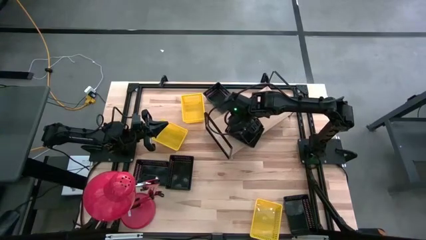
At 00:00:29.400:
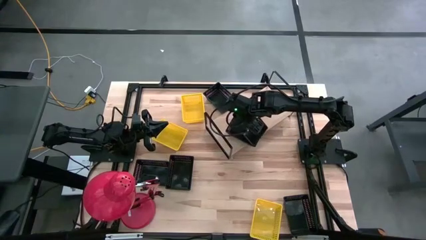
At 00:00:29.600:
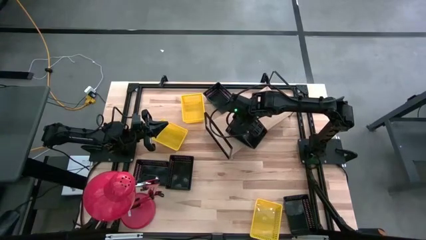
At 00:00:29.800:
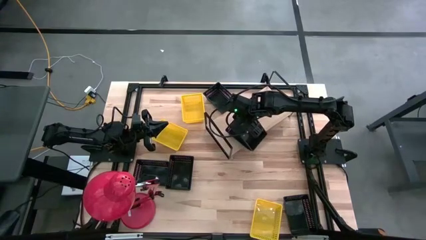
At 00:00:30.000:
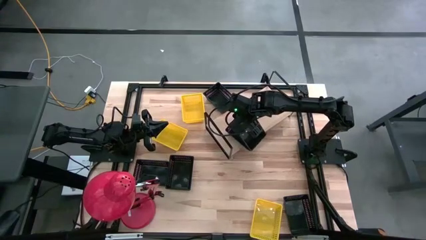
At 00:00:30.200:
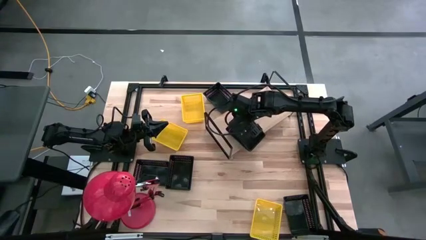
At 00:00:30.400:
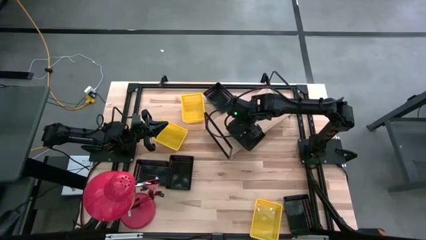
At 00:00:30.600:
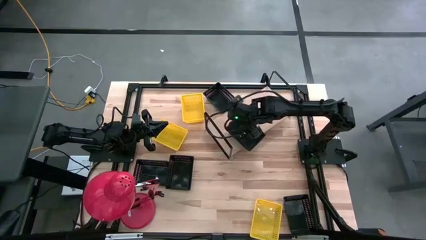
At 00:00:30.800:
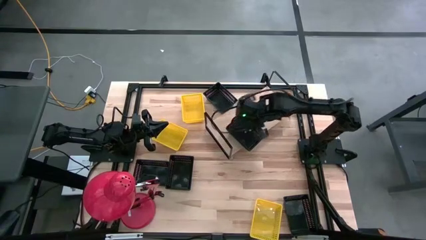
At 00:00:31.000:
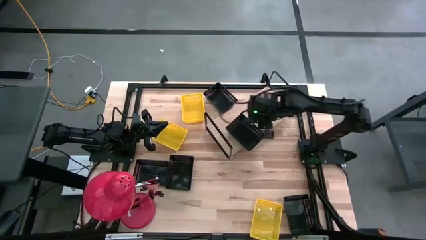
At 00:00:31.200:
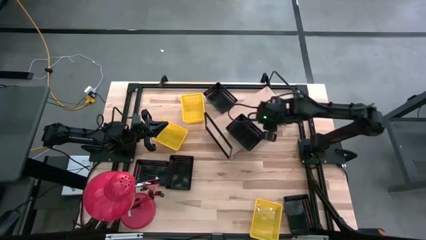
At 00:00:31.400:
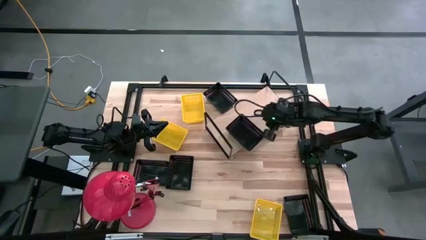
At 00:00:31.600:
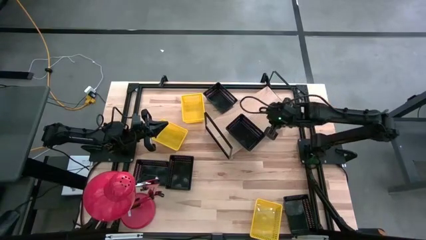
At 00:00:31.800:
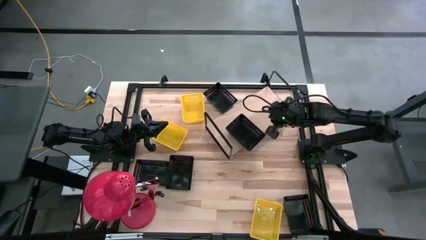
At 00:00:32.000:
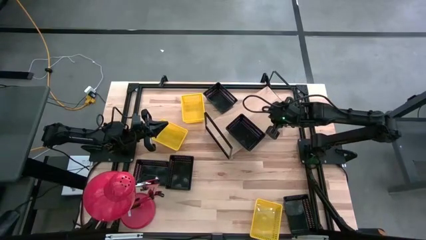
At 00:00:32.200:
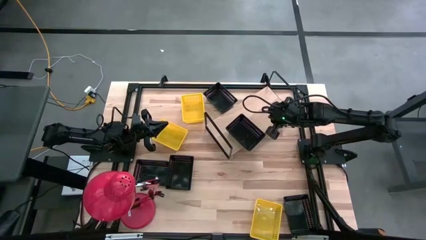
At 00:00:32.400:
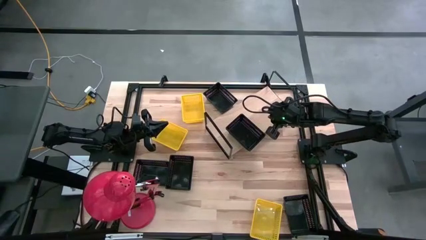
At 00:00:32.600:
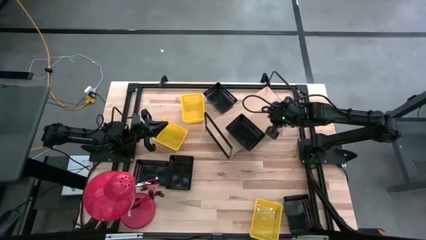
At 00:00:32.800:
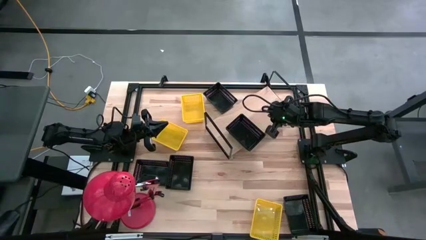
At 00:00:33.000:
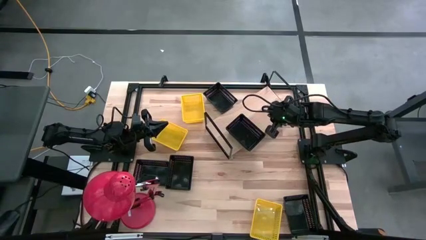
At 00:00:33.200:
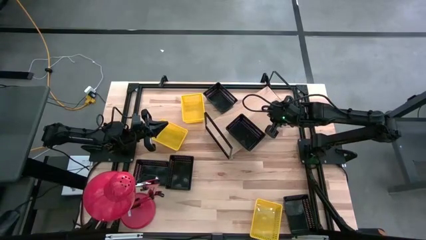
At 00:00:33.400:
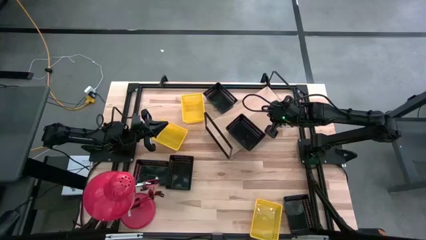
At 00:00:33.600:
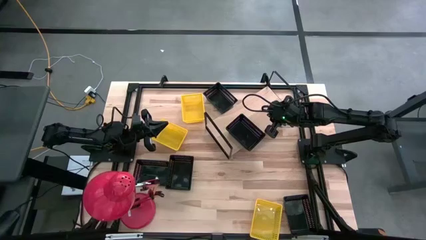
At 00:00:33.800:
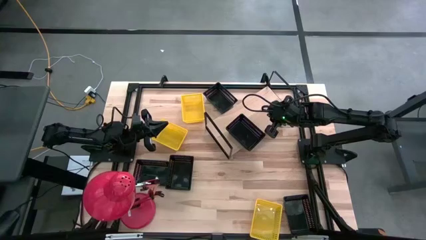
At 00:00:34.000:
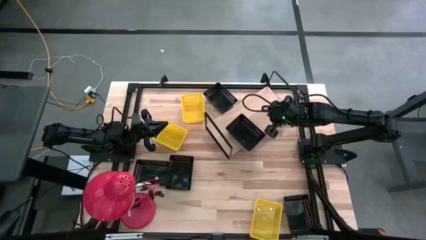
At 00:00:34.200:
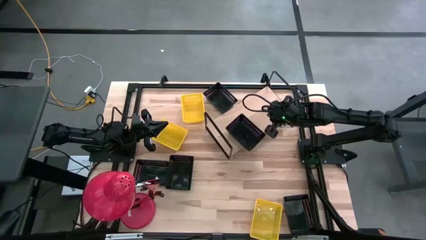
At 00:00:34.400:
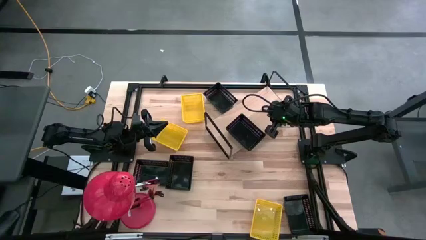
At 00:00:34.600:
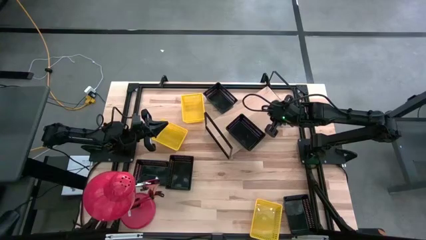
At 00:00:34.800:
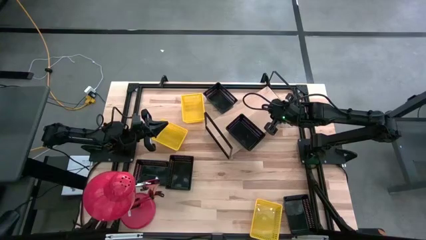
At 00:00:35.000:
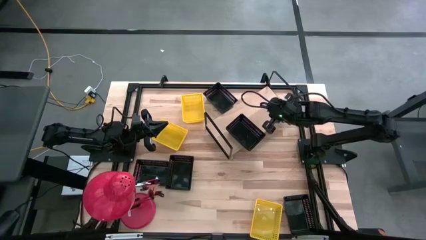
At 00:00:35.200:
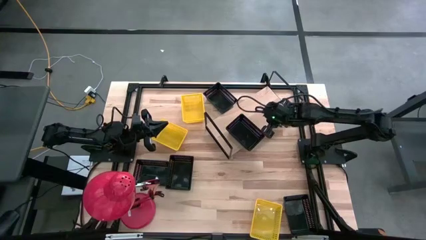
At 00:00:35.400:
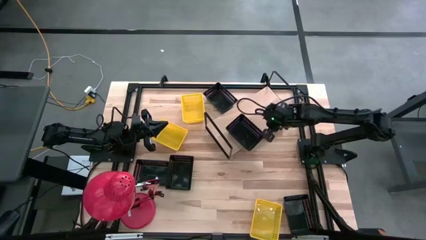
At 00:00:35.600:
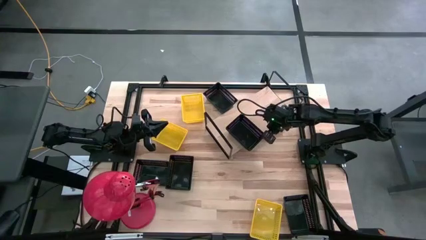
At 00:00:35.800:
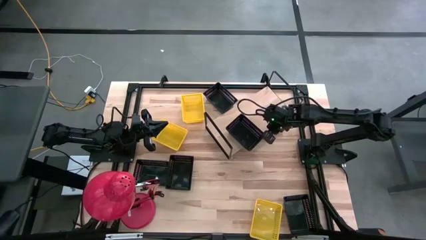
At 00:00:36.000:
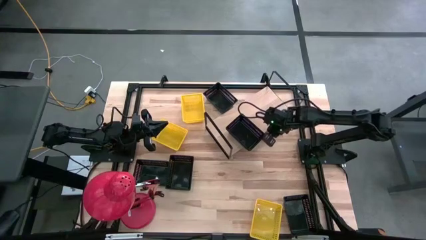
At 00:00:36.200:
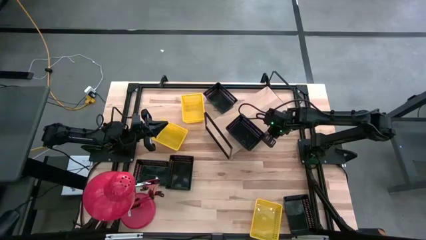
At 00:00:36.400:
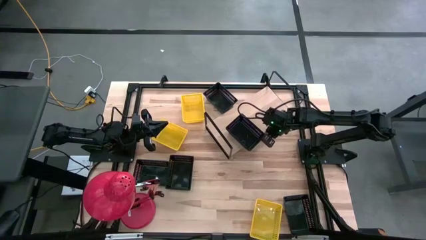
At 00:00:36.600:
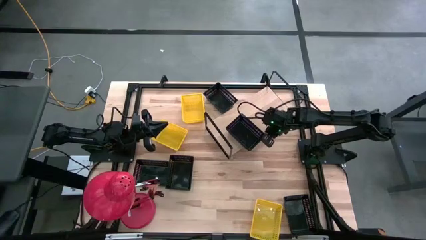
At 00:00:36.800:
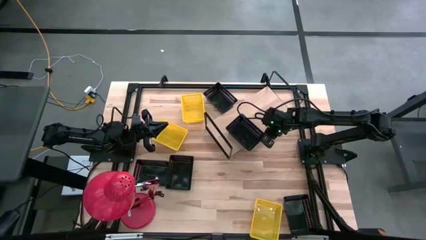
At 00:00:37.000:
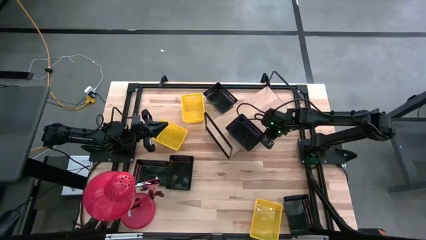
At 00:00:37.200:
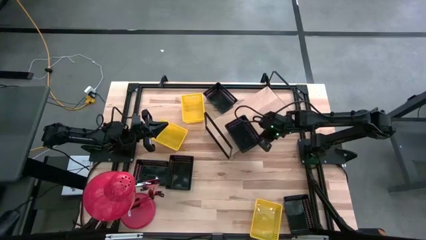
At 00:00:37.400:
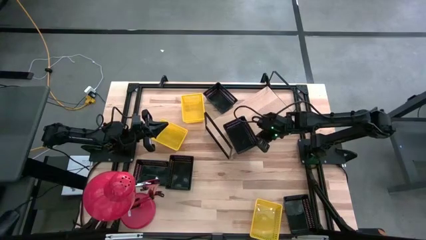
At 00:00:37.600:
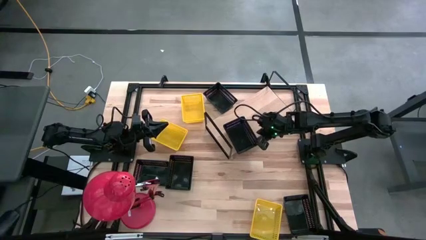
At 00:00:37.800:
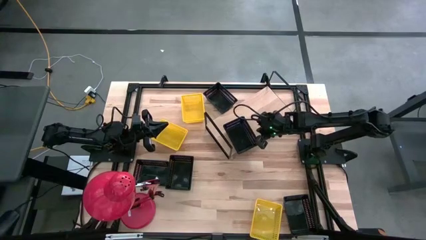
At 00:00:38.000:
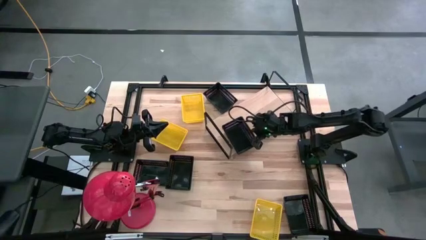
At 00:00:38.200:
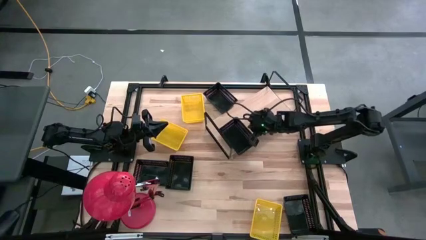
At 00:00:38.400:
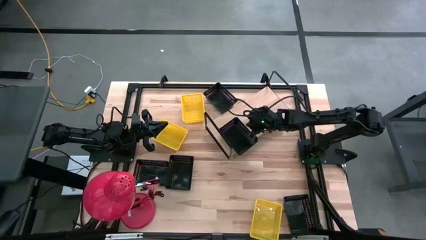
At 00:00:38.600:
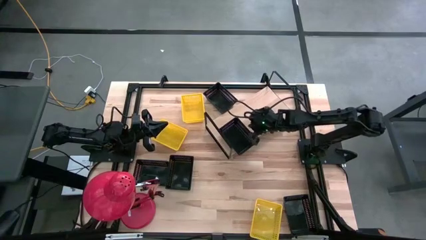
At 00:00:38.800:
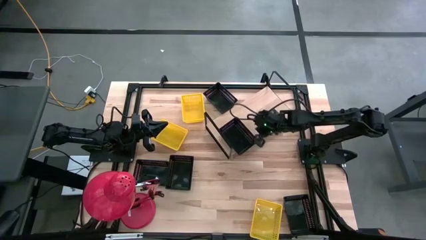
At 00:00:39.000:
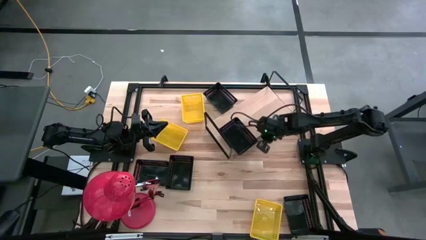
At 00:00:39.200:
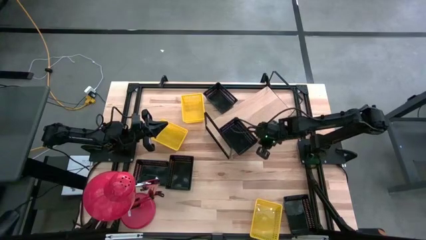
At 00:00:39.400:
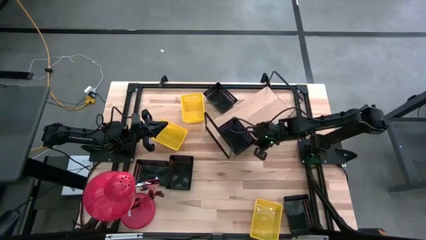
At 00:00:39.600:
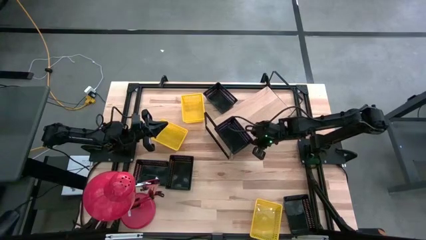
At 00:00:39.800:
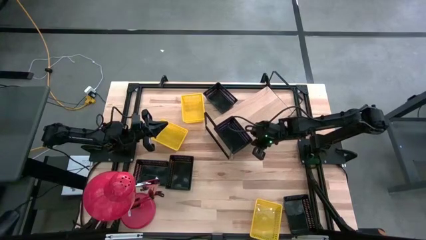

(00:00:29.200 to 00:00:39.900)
Task: Stack baskets on shelf by color
Stack the black bin on top of the black bin on the shelf
